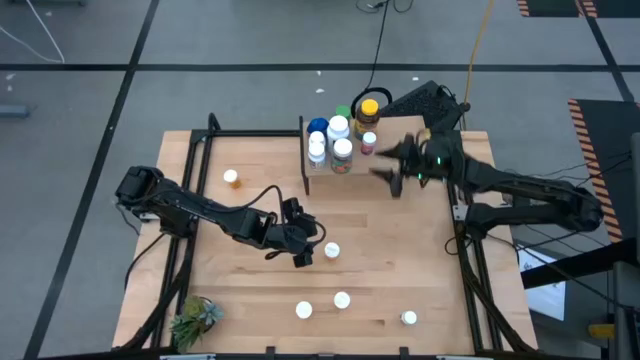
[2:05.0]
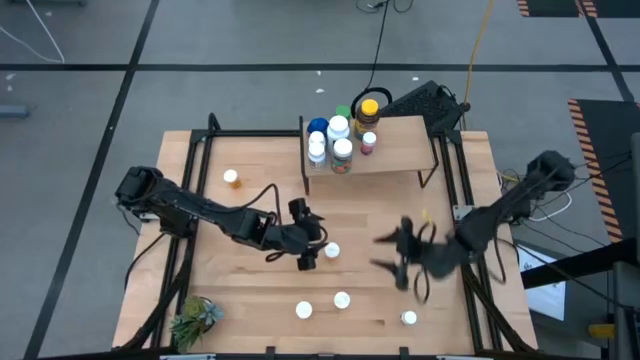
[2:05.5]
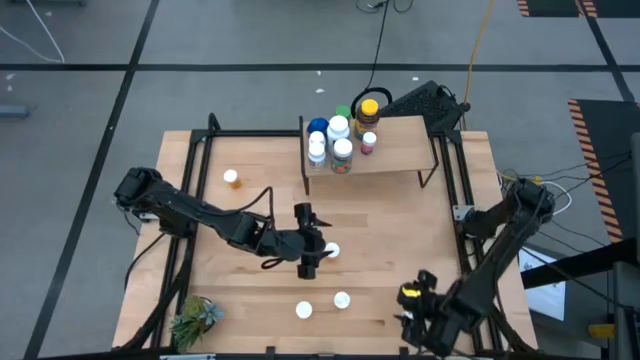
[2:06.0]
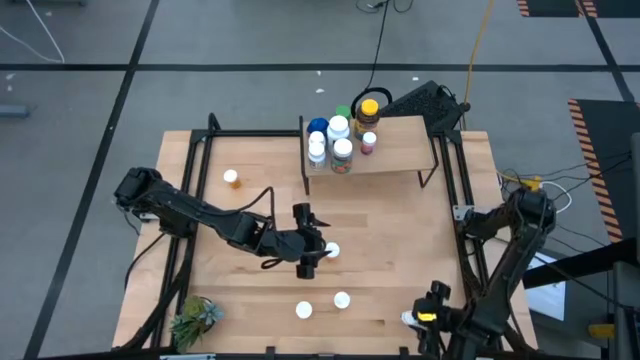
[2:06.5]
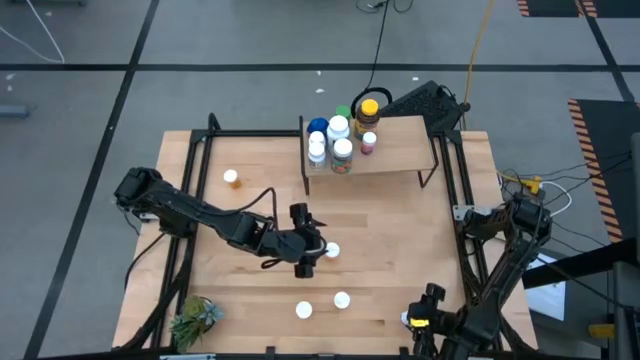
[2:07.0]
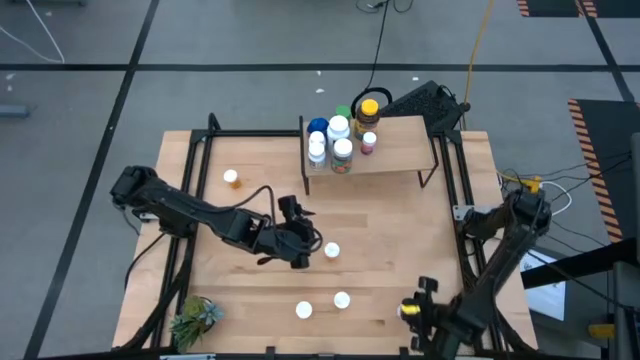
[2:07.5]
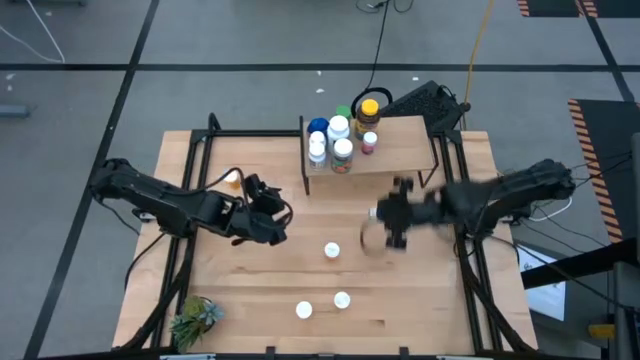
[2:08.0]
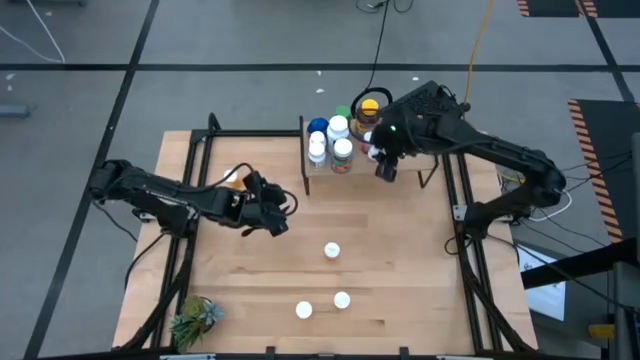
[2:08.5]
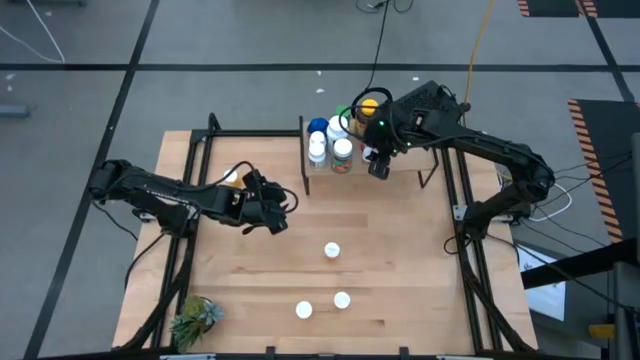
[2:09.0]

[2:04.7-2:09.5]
Task: Pick and place medicine bottles onto shelf by color
Put the white bottle on the shelf

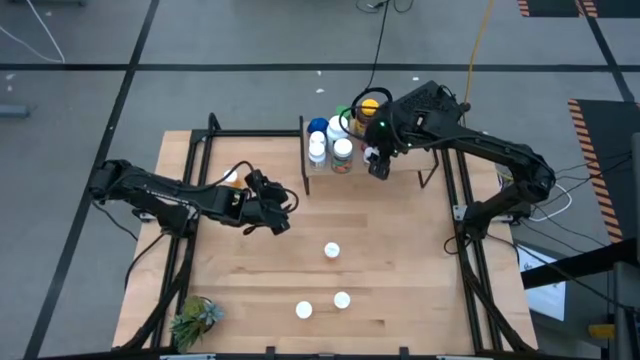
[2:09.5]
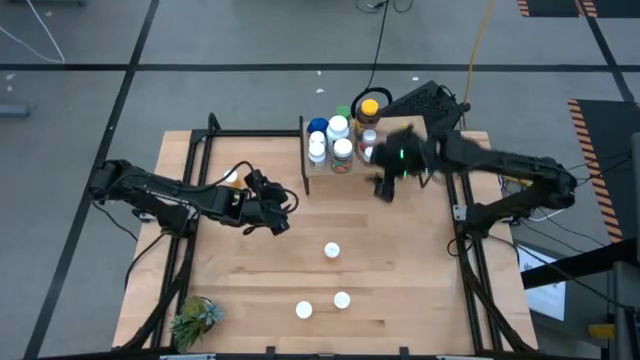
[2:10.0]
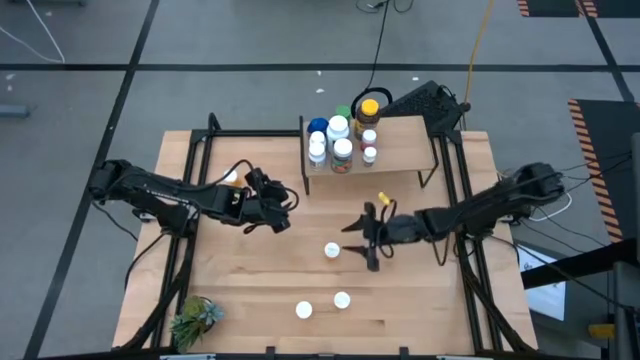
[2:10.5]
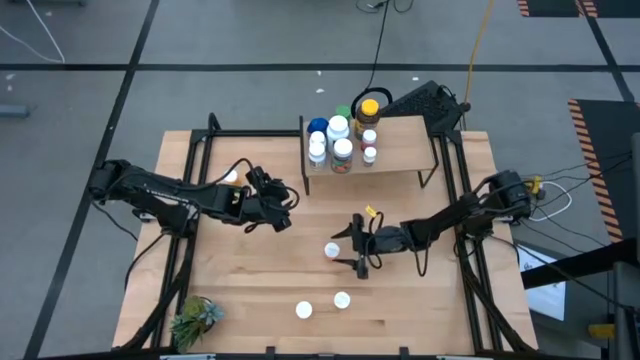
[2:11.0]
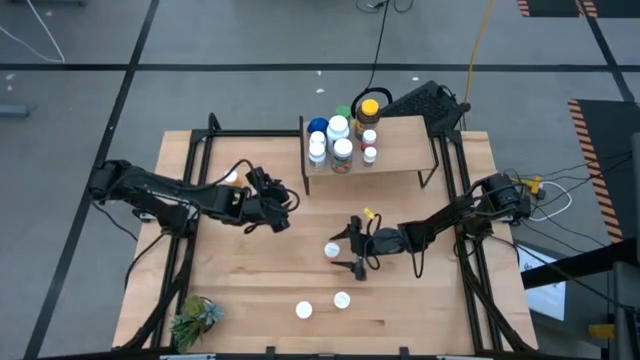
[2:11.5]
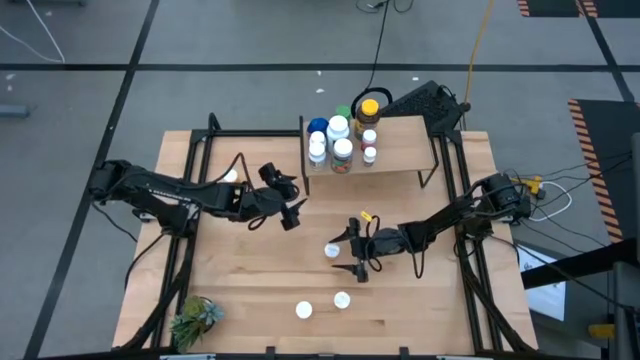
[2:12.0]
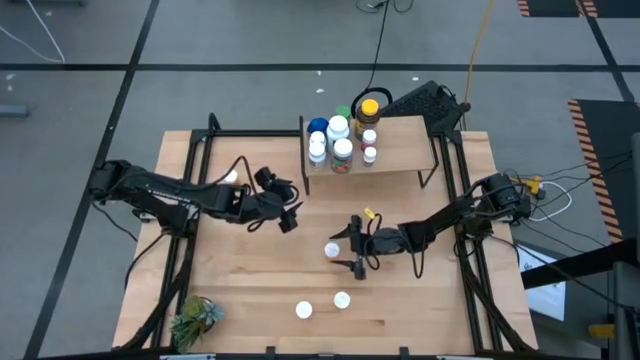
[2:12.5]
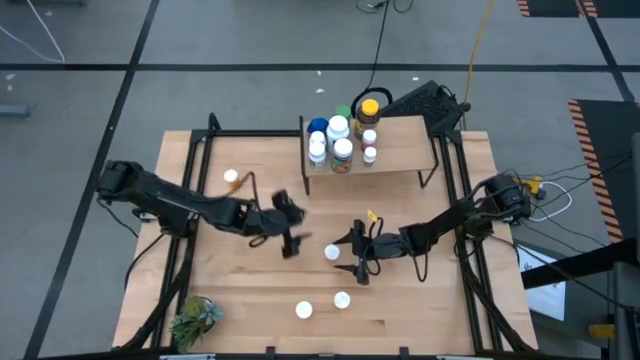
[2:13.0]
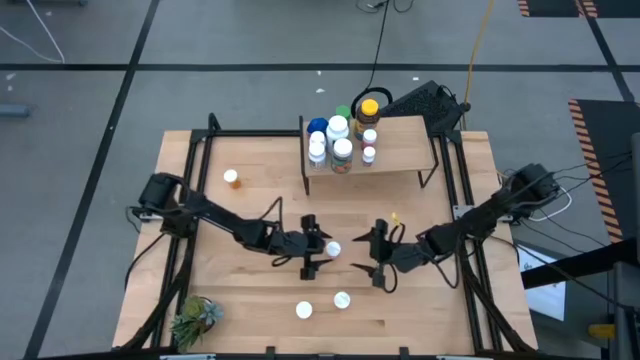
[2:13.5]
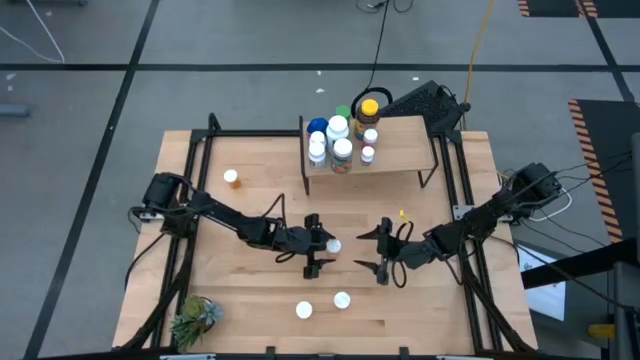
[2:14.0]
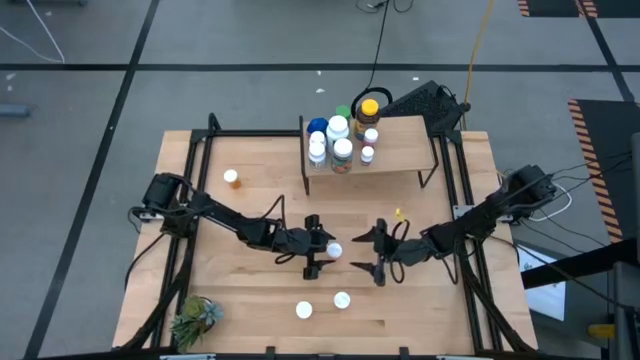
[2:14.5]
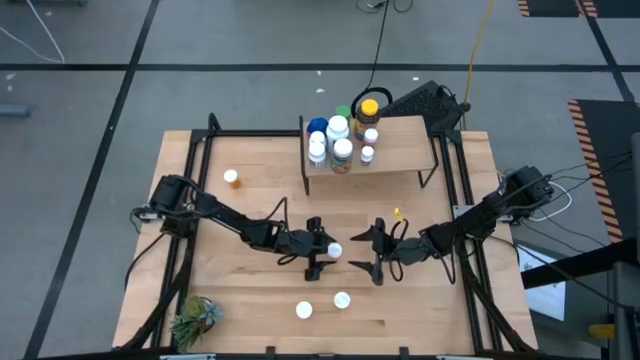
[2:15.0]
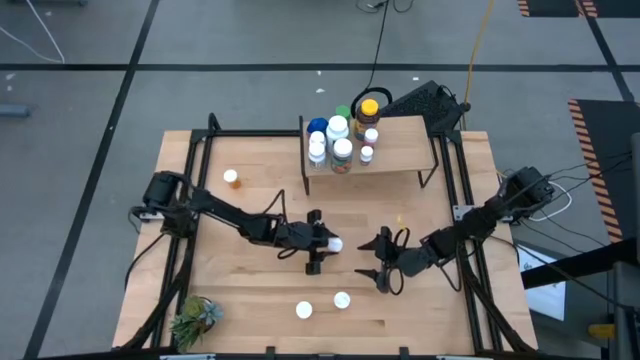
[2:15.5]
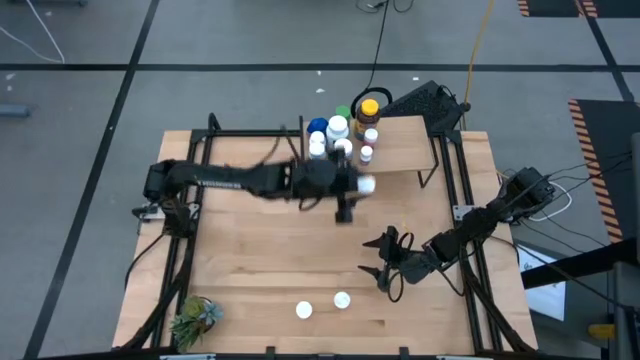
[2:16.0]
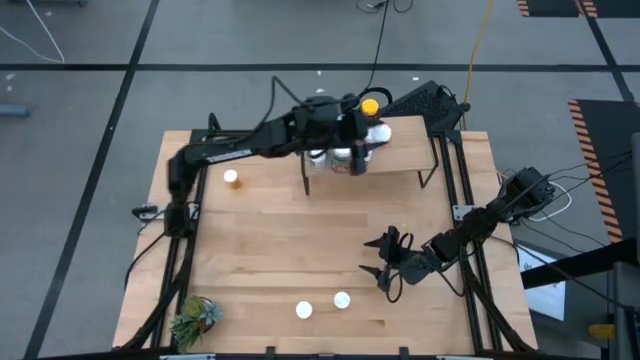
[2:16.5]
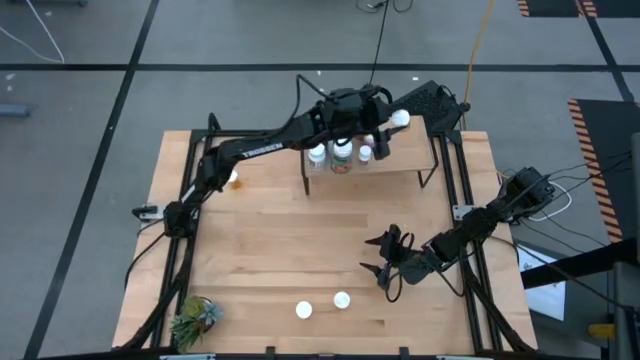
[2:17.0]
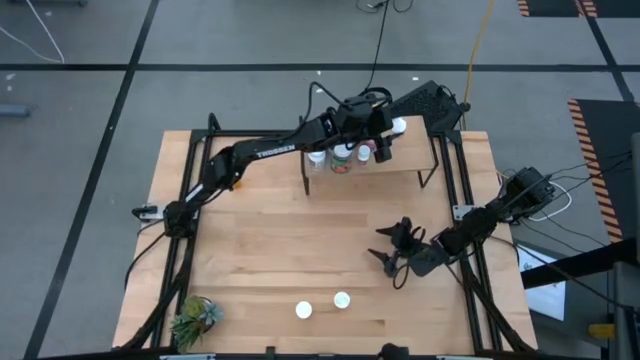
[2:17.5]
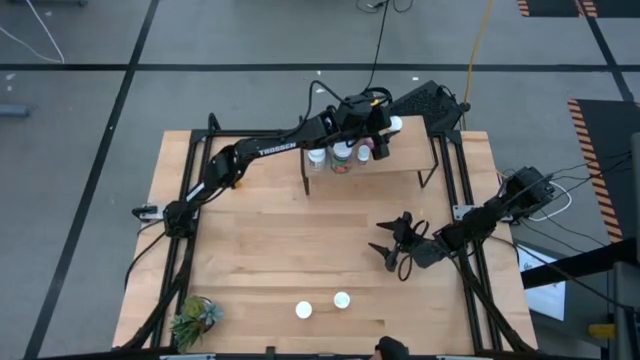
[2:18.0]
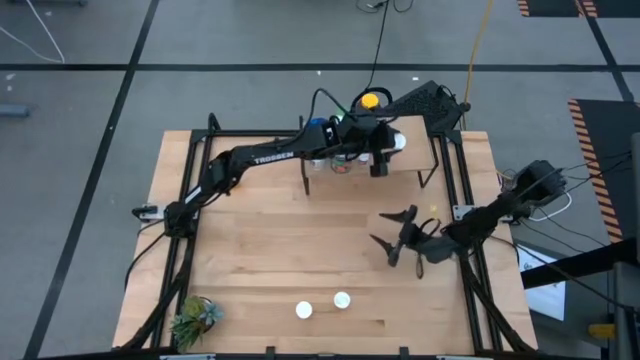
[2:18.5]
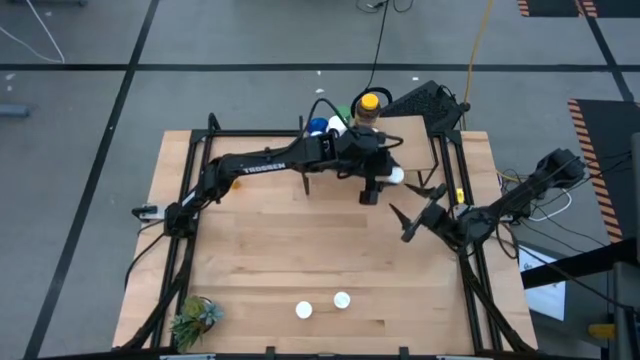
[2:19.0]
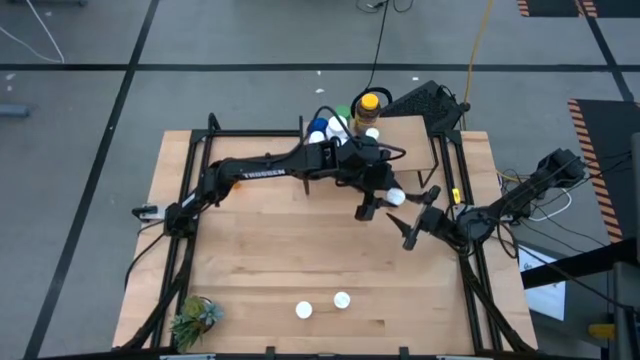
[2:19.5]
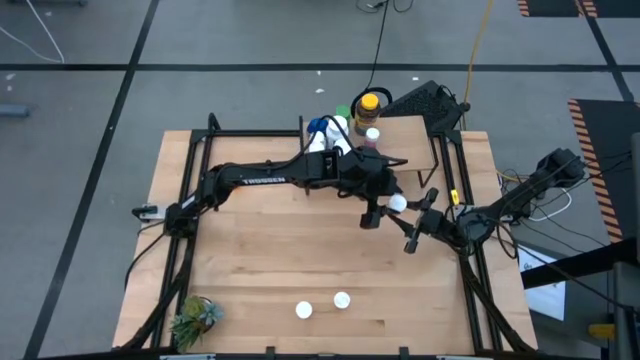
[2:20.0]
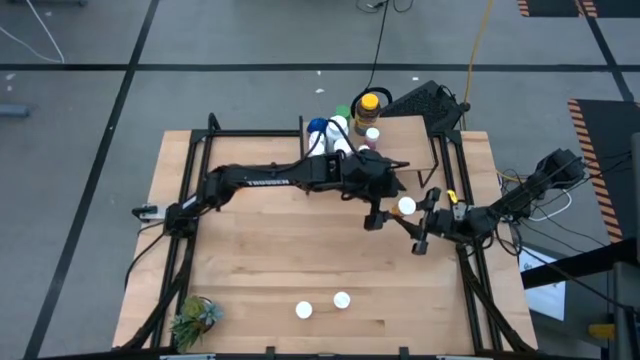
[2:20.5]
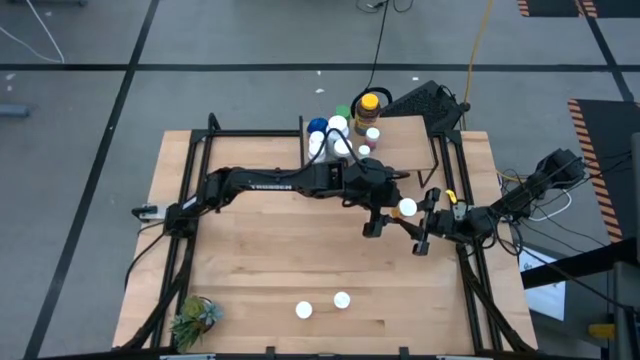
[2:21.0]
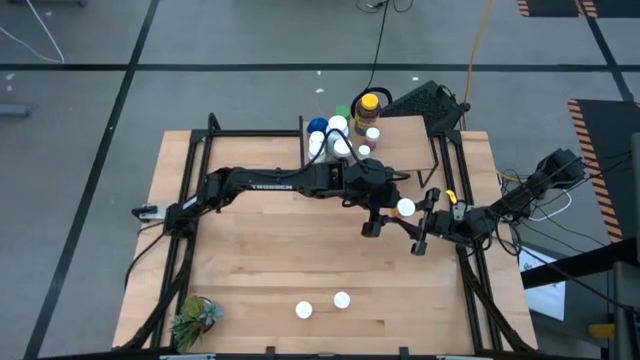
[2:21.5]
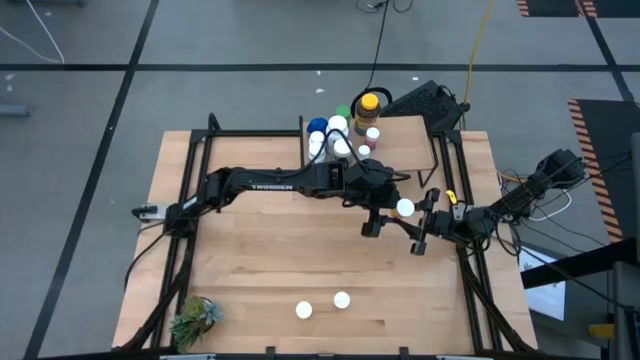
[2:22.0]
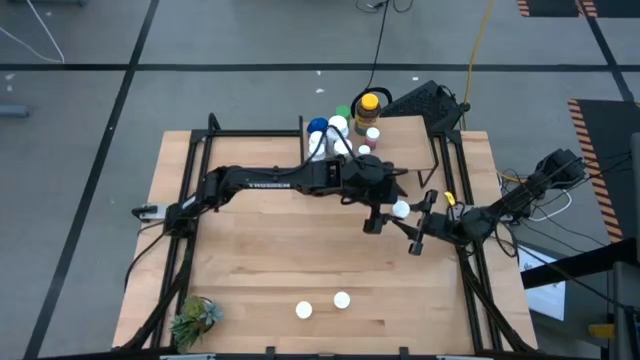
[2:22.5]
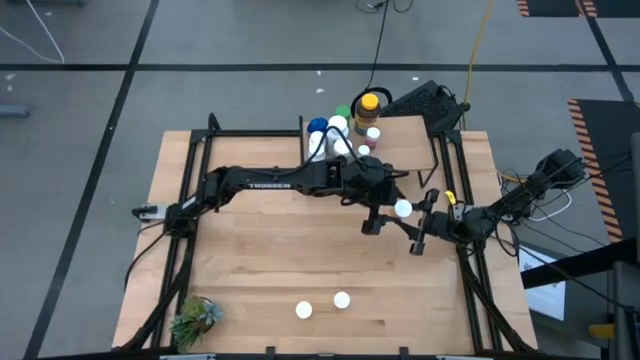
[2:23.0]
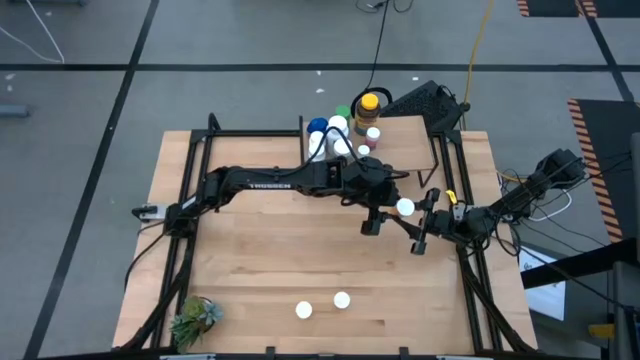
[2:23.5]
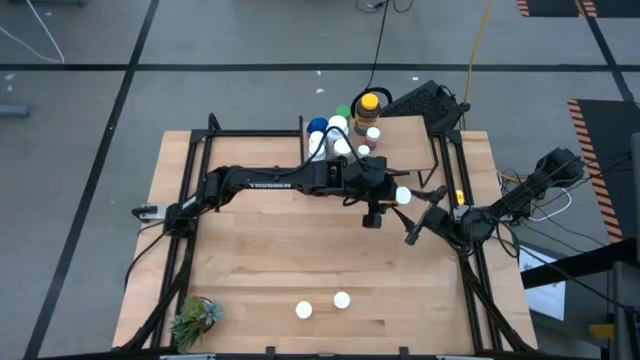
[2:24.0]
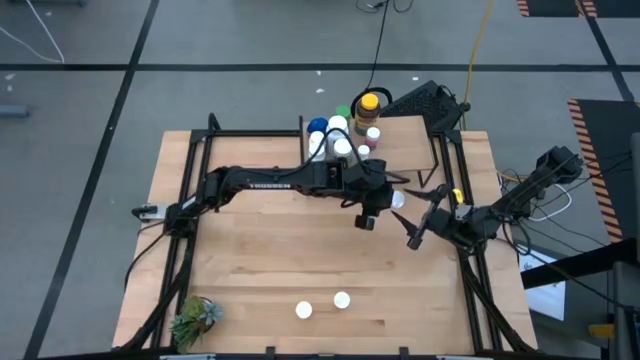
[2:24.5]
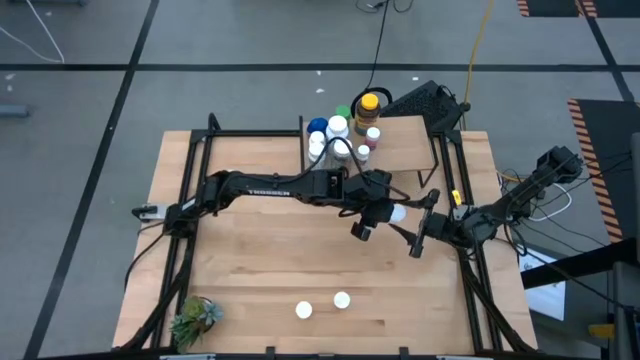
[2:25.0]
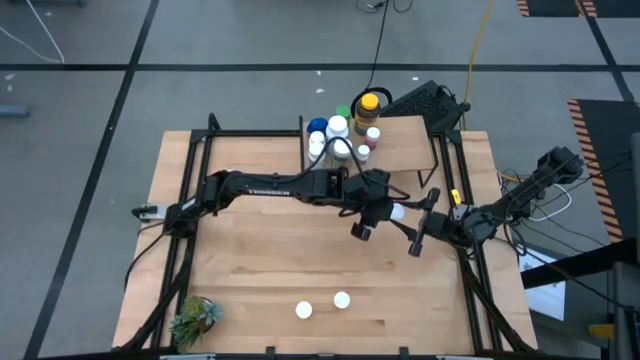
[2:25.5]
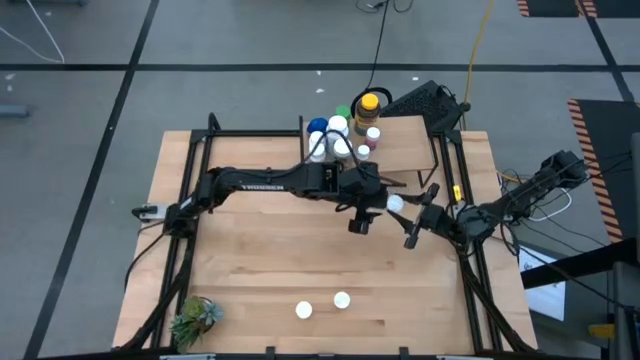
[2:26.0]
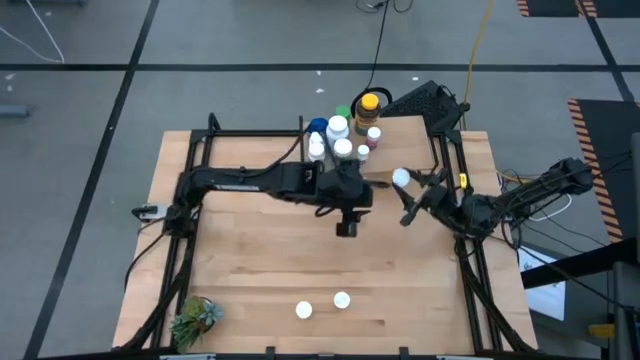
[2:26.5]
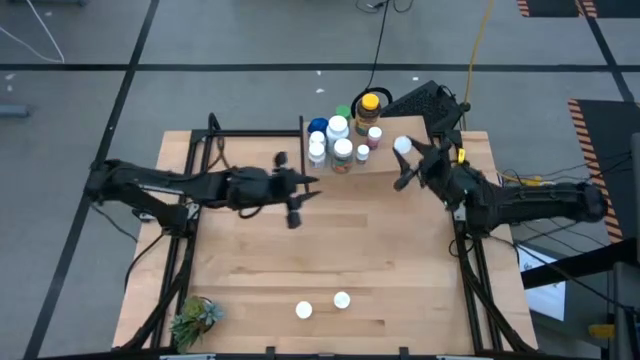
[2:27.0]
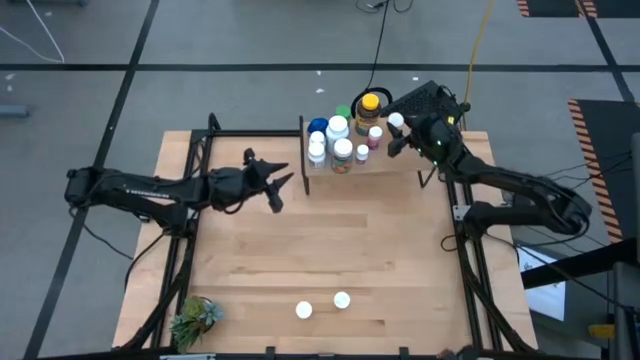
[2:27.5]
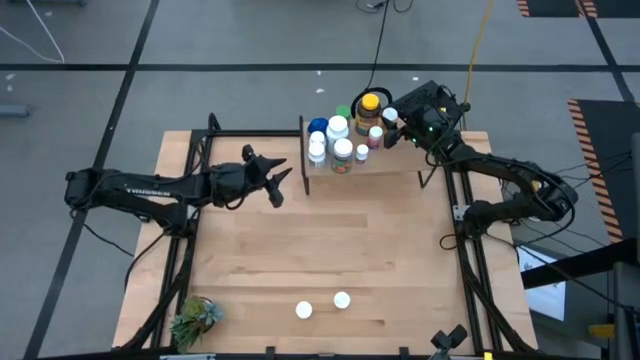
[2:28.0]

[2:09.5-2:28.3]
Put the orange bottle on the shelf

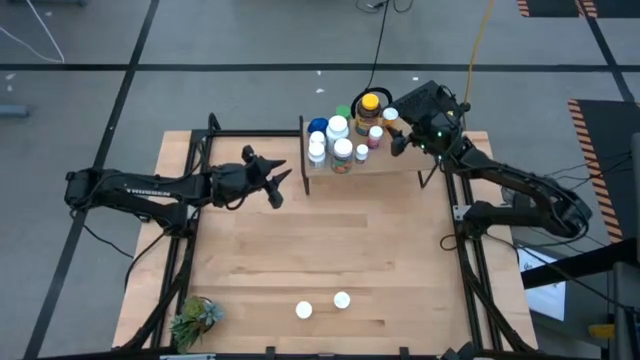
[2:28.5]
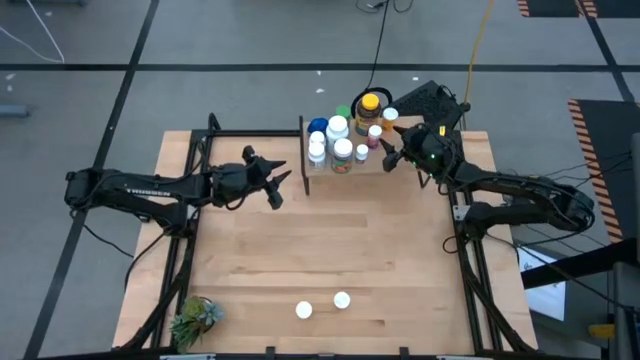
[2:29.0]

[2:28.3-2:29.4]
Adjust the pink bottle on the table
